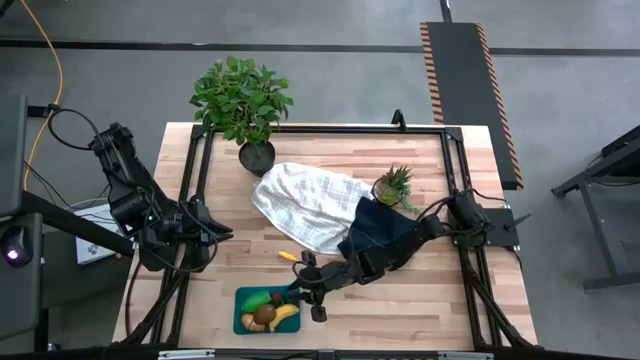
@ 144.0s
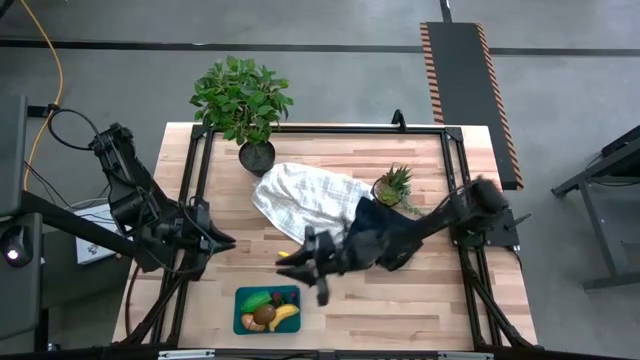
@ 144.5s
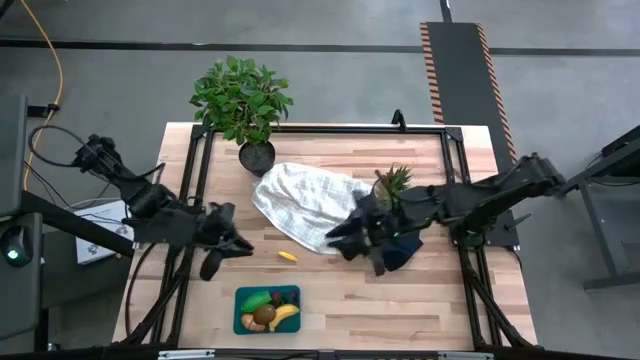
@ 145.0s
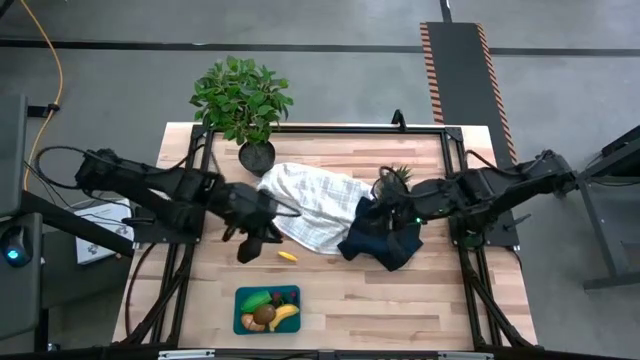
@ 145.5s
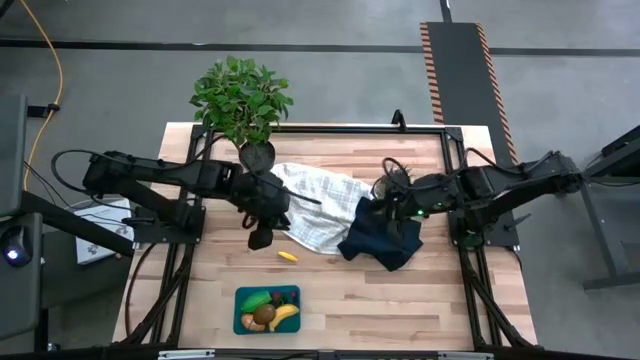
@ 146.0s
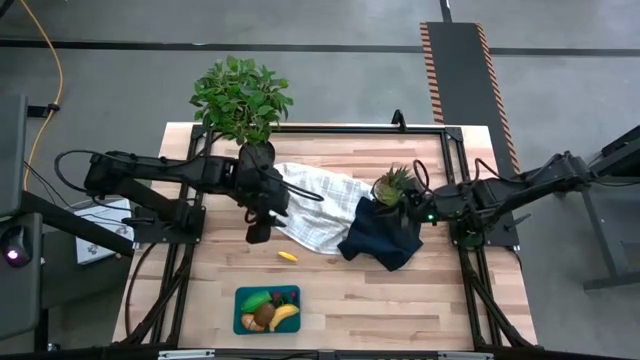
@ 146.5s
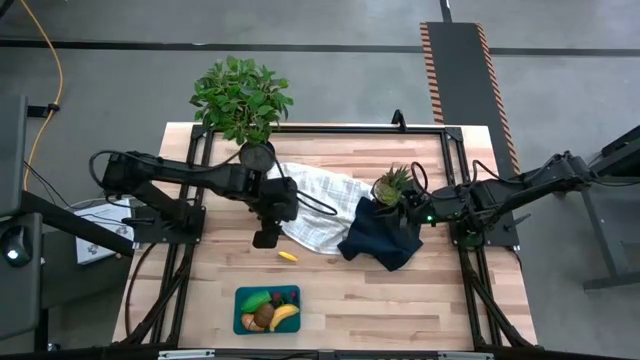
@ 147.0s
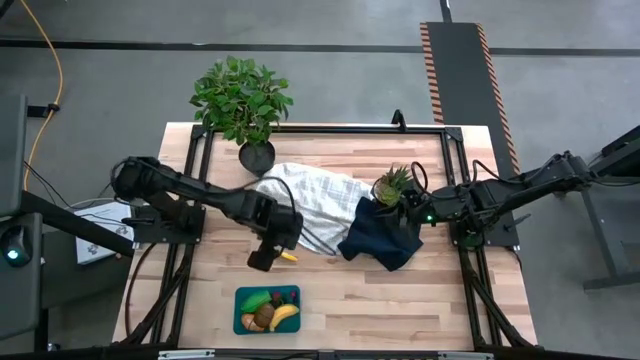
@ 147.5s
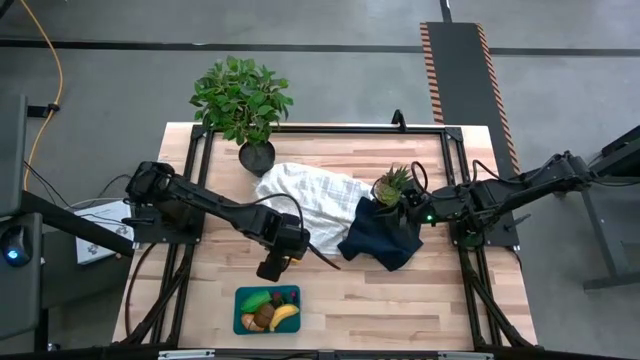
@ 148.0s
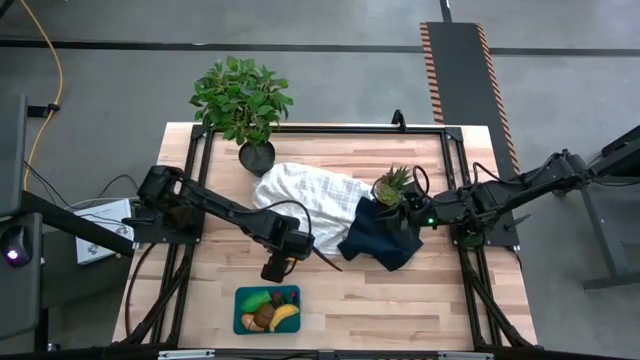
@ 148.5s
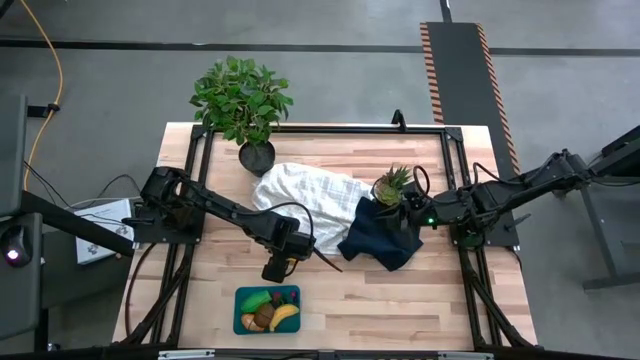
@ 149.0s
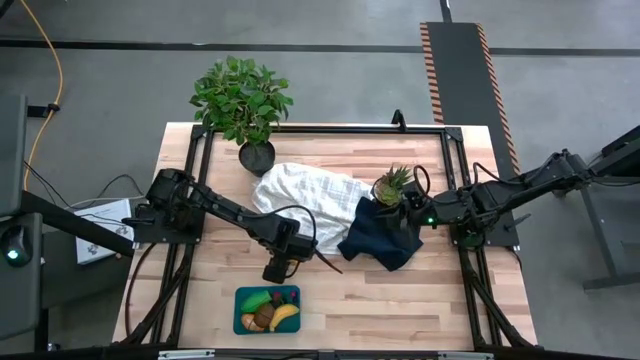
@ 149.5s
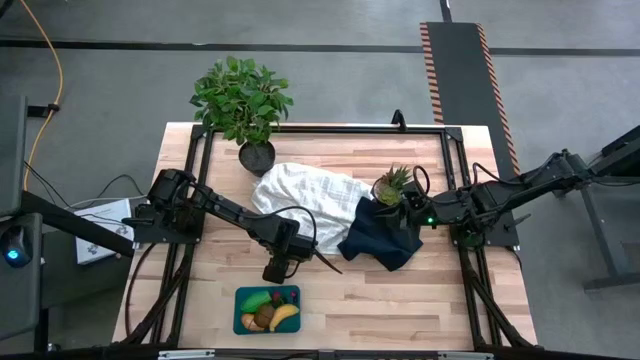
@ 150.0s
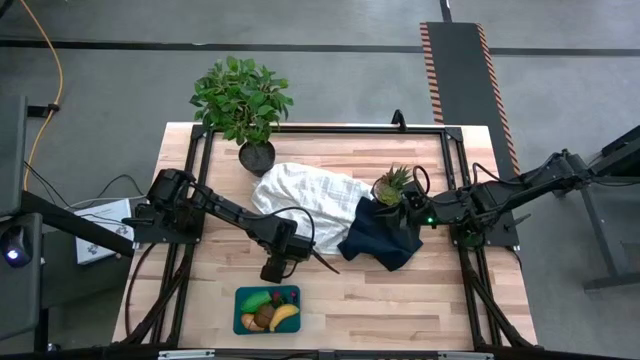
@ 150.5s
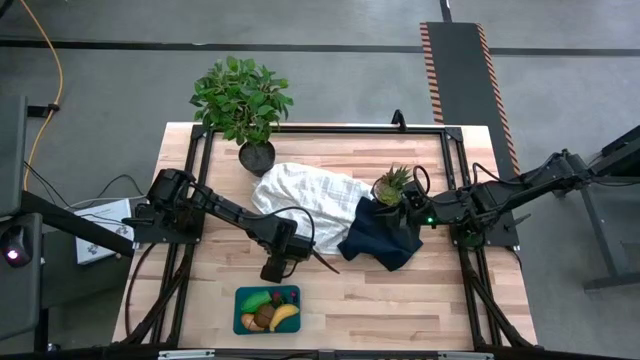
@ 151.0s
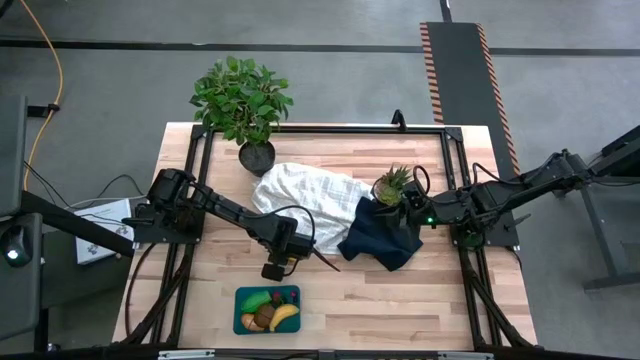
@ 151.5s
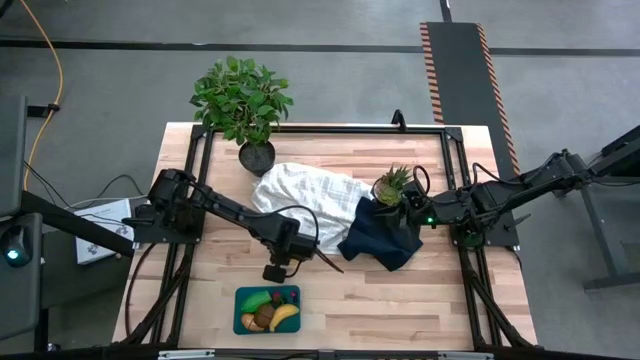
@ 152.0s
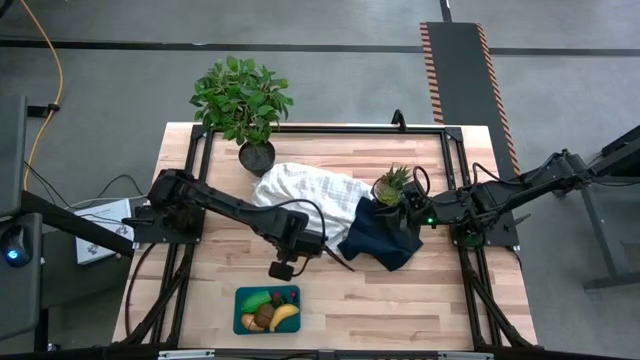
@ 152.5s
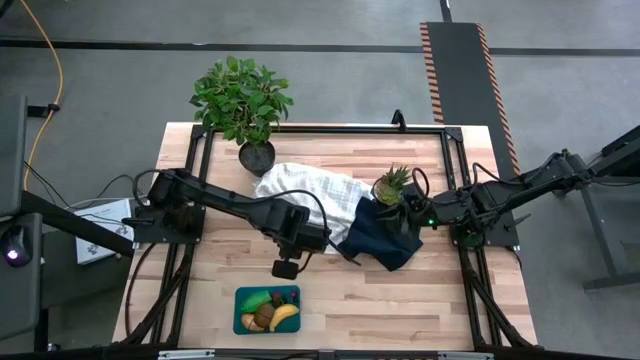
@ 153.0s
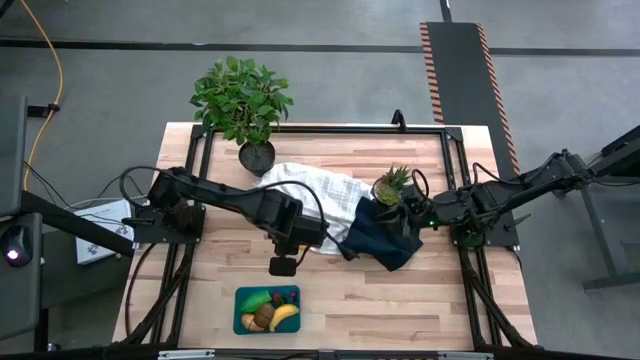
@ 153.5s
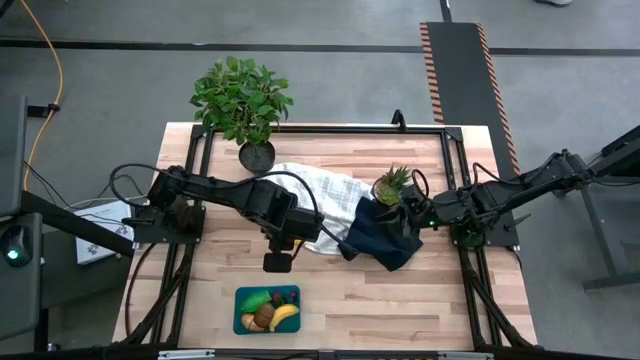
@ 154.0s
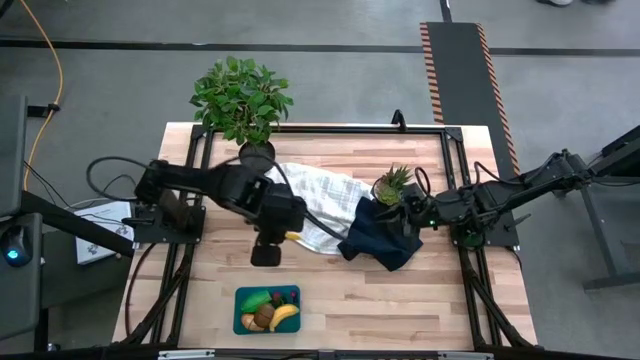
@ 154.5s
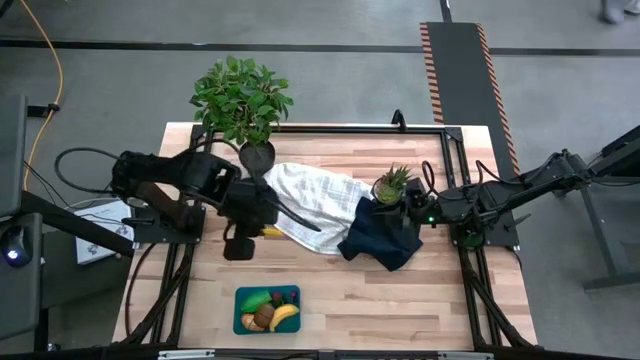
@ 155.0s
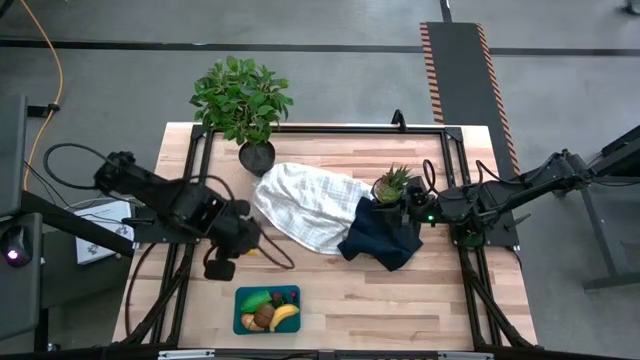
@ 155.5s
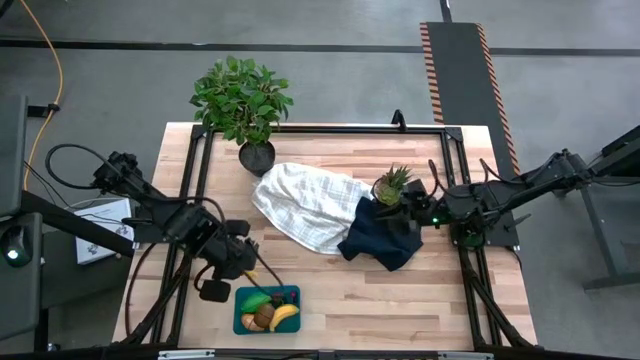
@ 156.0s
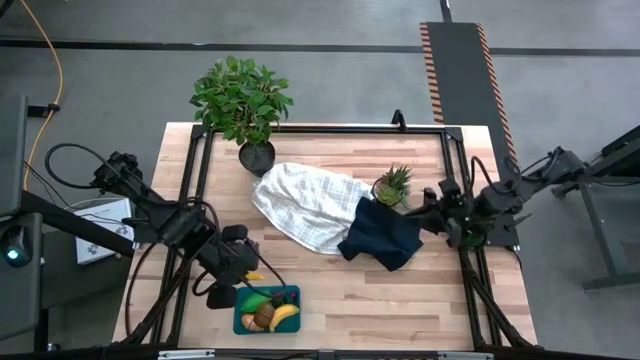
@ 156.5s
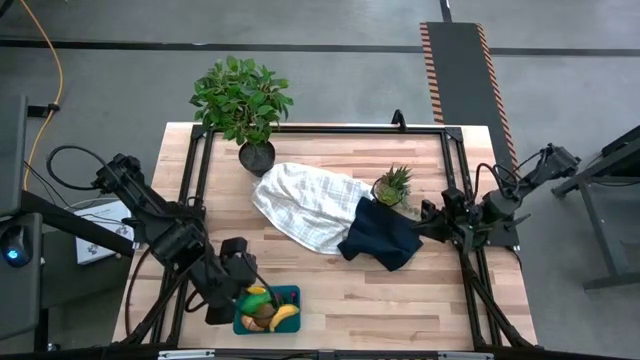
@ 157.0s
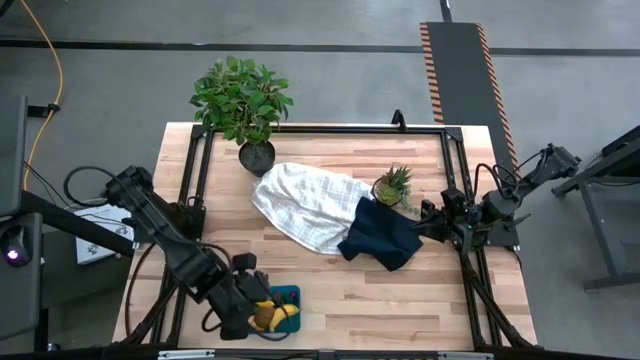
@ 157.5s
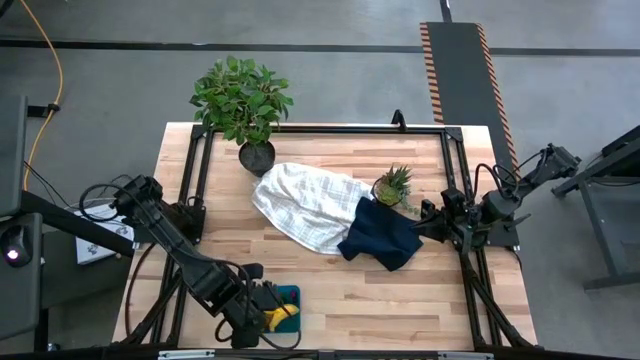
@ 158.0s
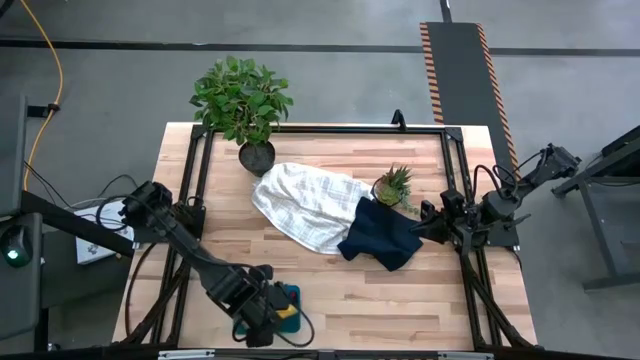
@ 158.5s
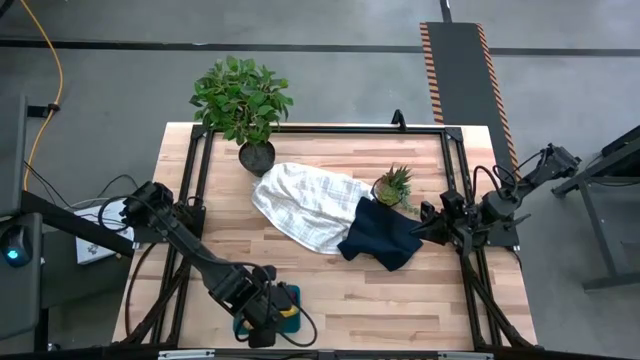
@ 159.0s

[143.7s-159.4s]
Task: Pick and placing Produce into tupperware
Put the yellow corn into the bin

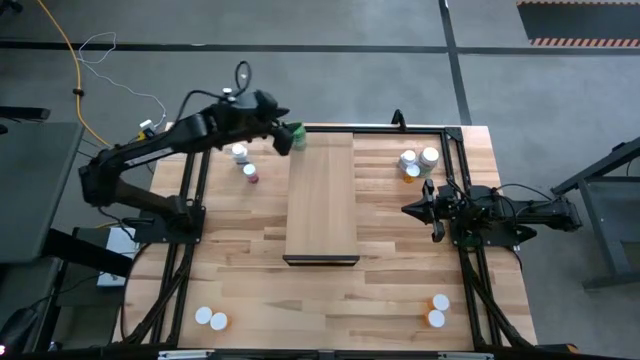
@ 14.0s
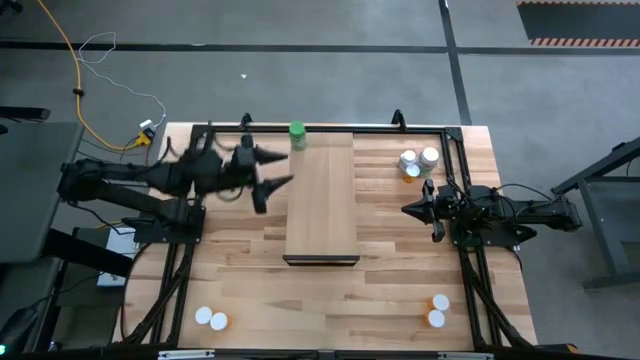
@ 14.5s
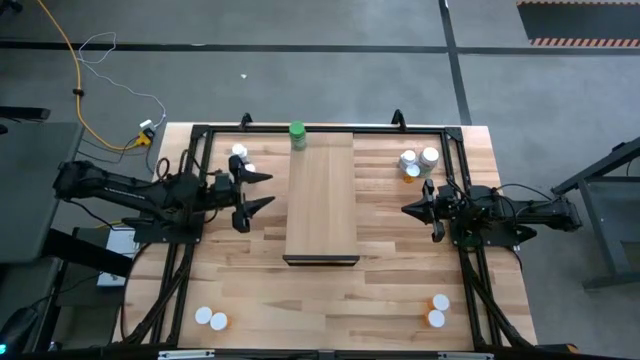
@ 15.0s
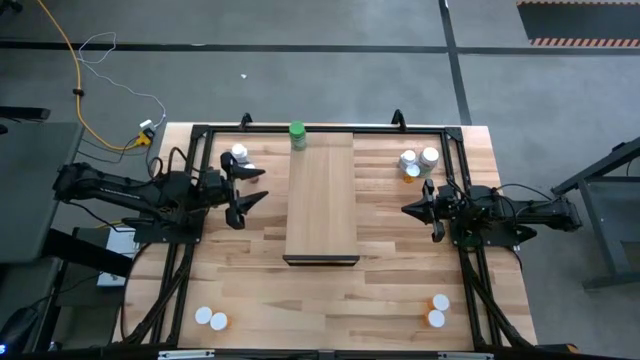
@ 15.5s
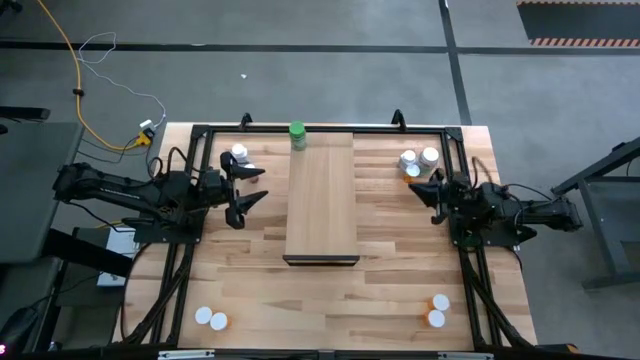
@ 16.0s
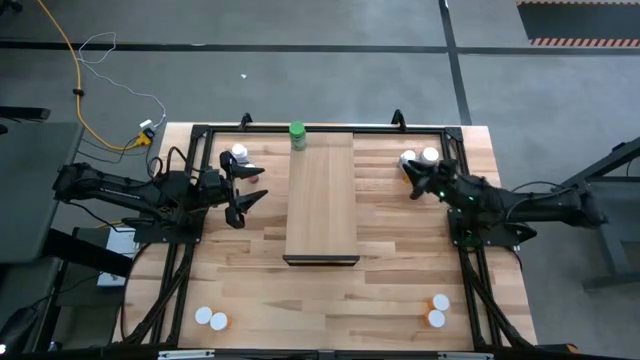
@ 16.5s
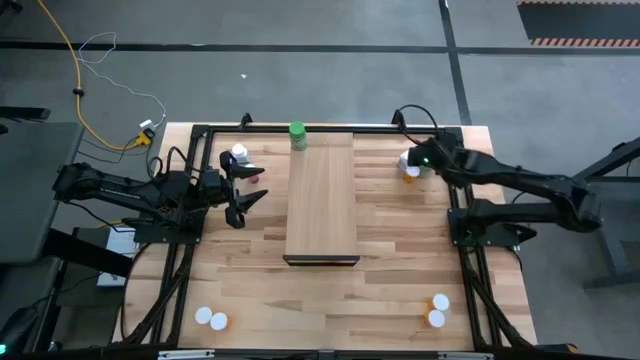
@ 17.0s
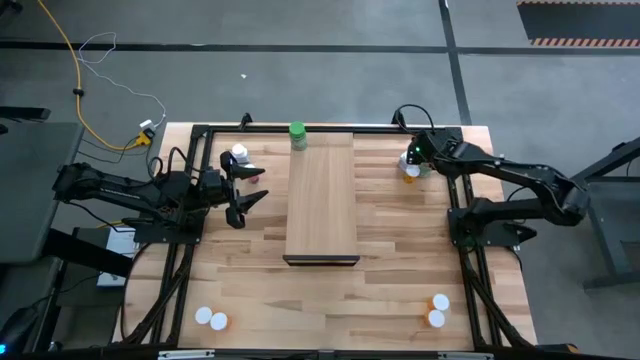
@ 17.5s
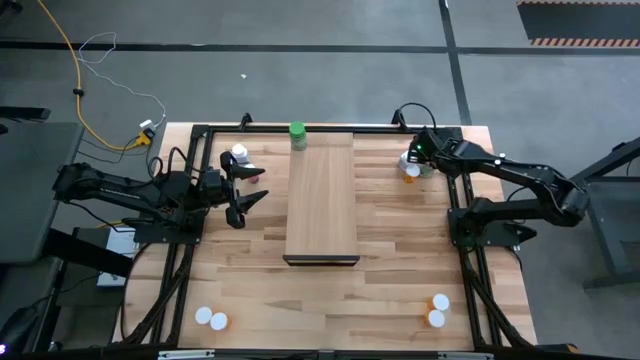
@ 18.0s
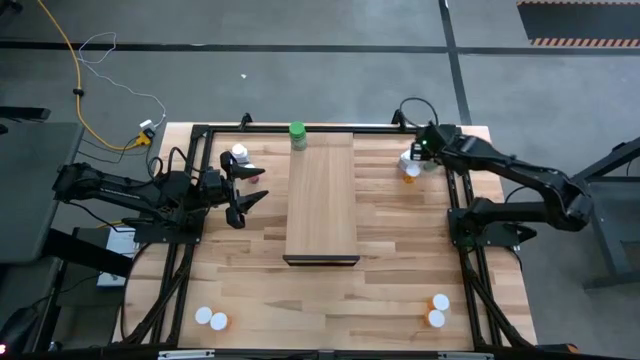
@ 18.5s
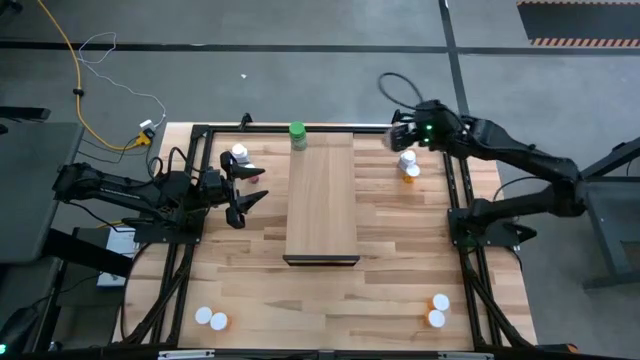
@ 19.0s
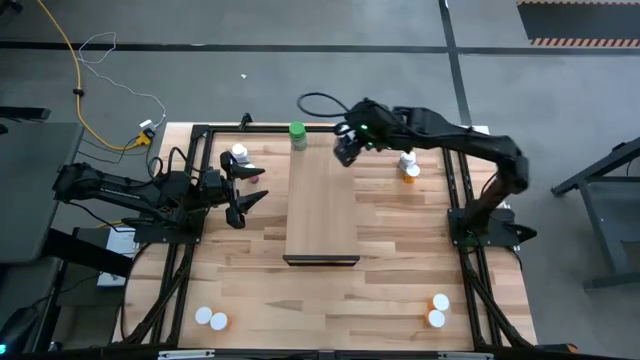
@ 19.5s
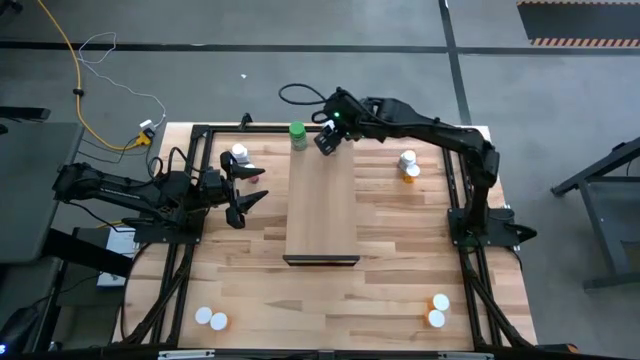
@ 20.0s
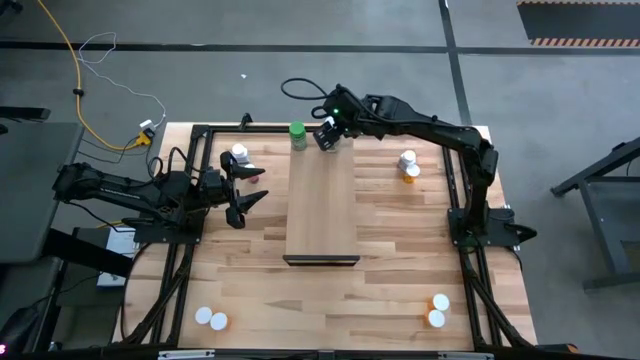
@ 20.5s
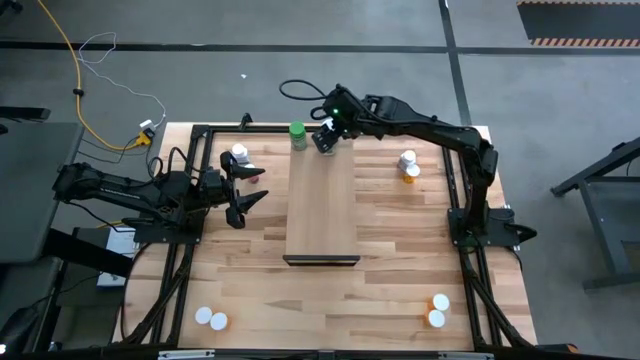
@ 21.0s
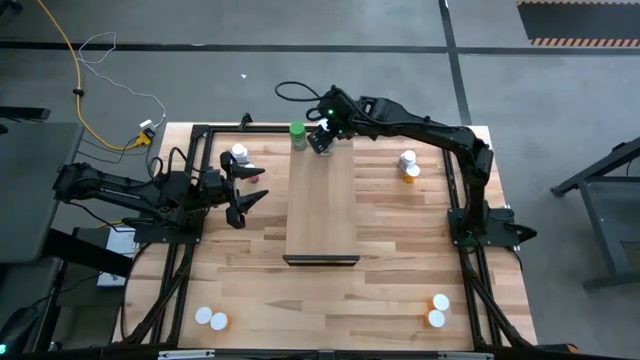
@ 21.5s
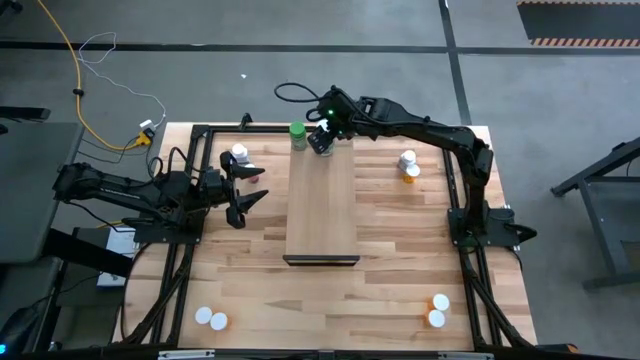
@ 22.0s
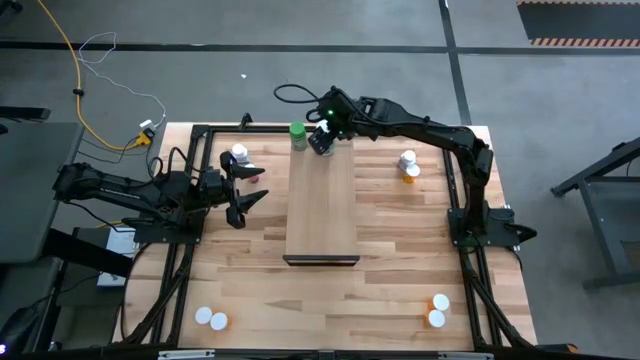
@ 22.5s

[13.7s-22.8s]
Task: Pick and place medicine bottles onto shelf by color
Put the pill bottle on the shelf
